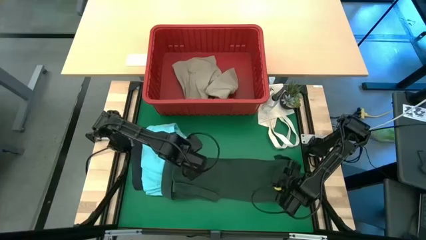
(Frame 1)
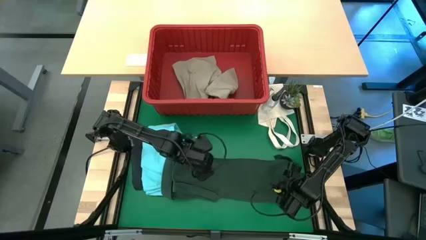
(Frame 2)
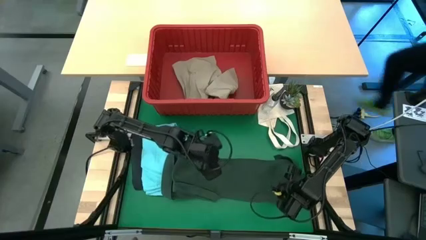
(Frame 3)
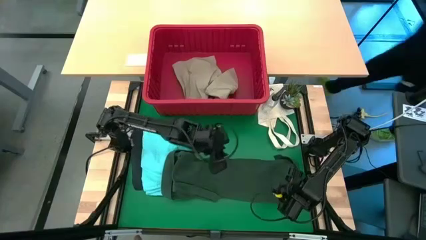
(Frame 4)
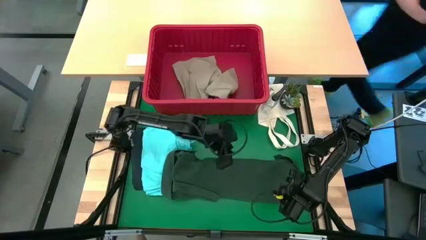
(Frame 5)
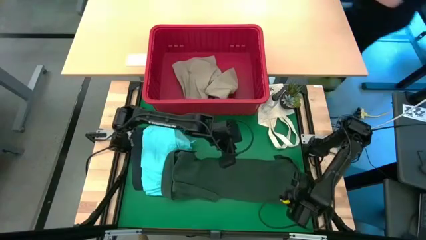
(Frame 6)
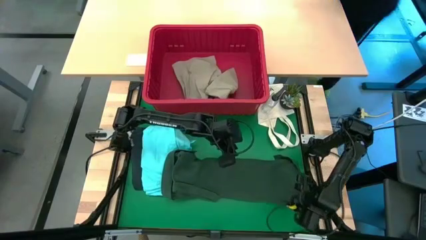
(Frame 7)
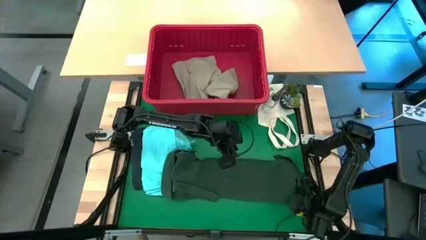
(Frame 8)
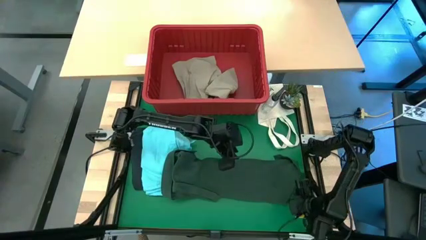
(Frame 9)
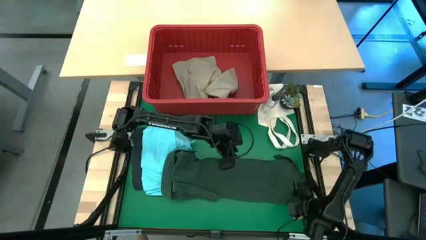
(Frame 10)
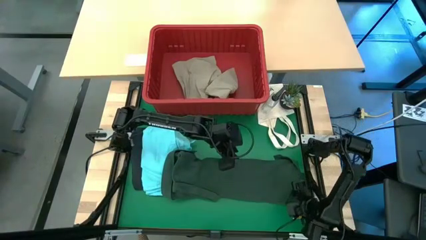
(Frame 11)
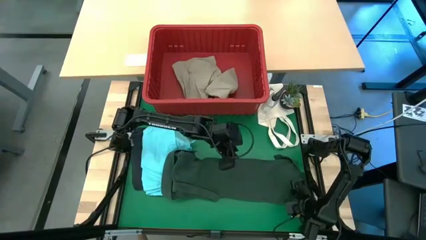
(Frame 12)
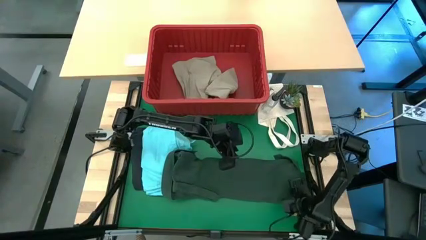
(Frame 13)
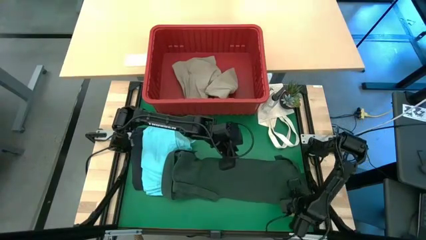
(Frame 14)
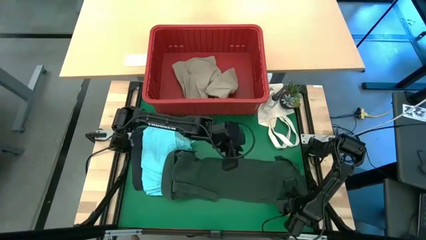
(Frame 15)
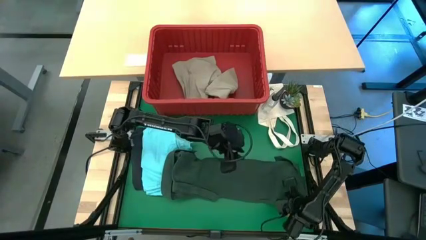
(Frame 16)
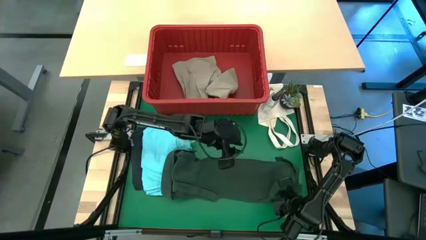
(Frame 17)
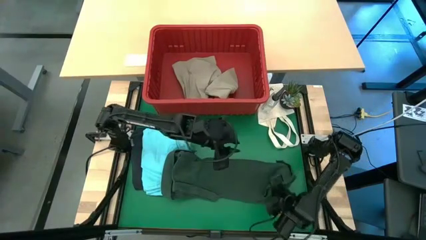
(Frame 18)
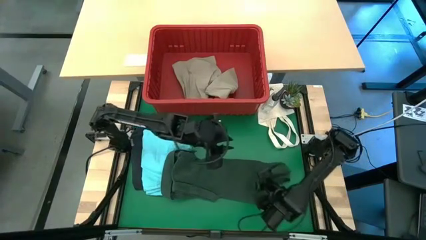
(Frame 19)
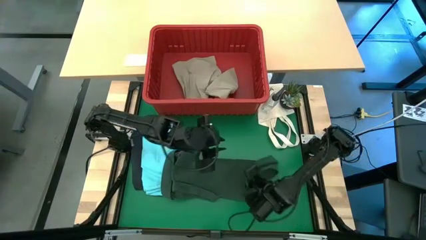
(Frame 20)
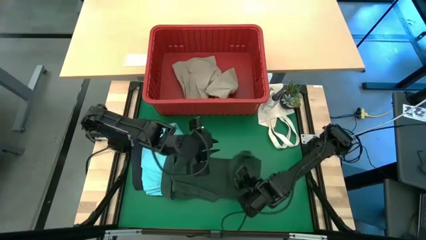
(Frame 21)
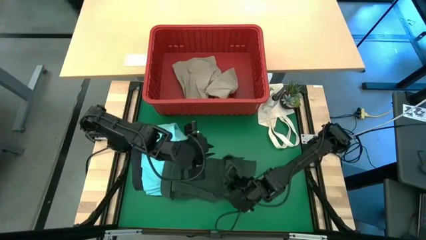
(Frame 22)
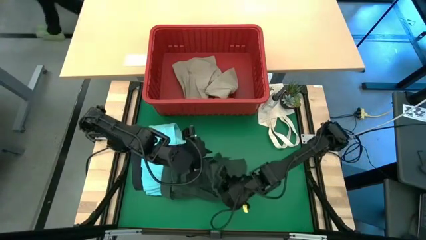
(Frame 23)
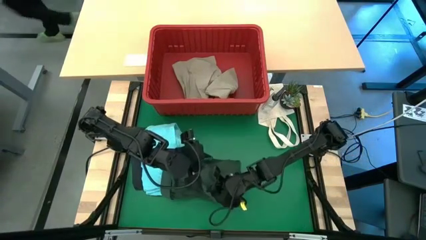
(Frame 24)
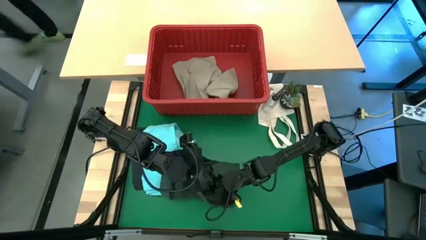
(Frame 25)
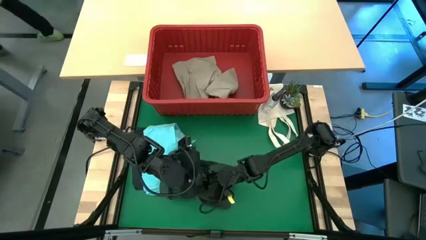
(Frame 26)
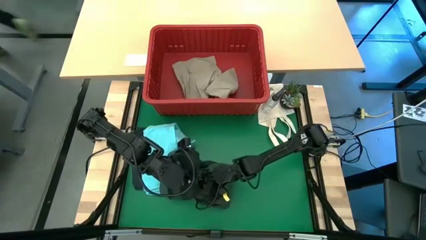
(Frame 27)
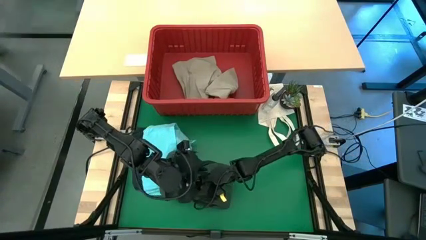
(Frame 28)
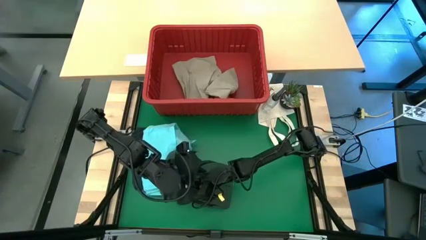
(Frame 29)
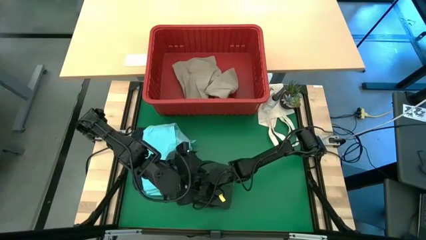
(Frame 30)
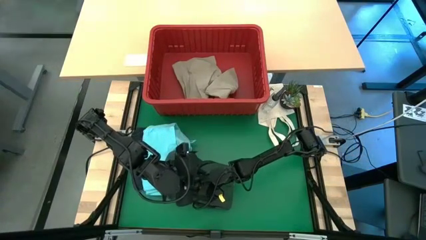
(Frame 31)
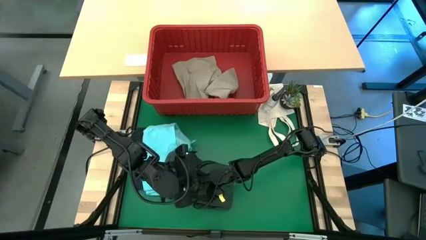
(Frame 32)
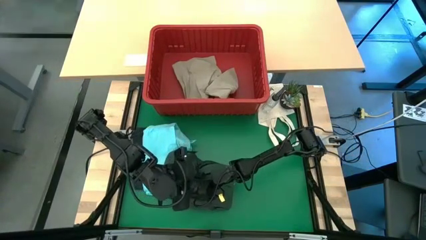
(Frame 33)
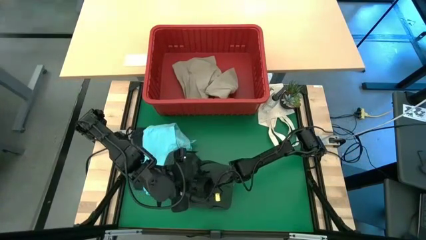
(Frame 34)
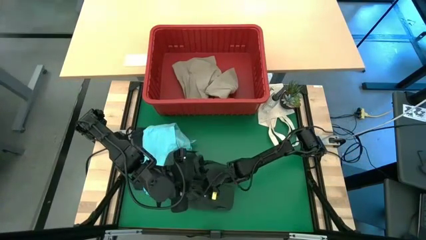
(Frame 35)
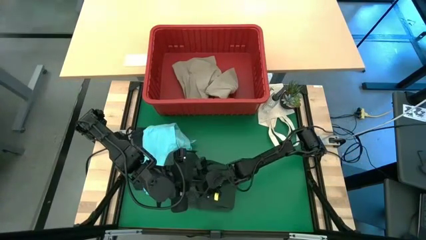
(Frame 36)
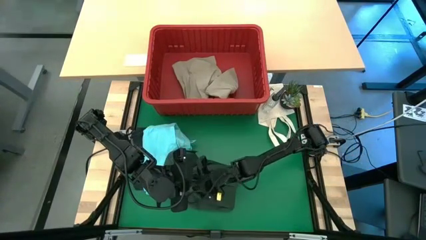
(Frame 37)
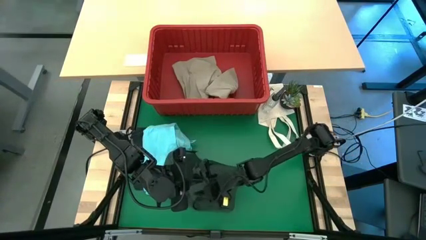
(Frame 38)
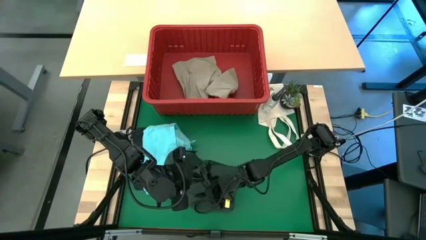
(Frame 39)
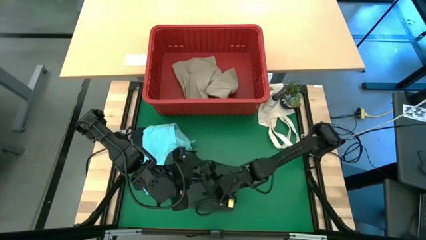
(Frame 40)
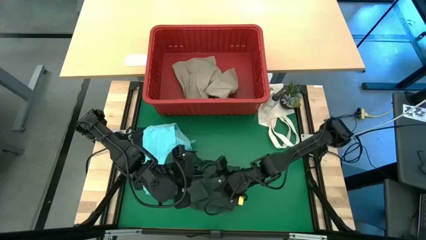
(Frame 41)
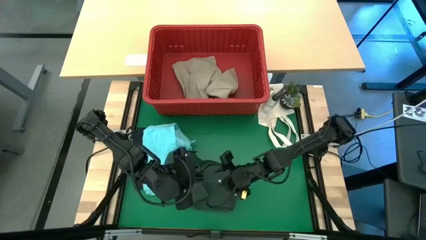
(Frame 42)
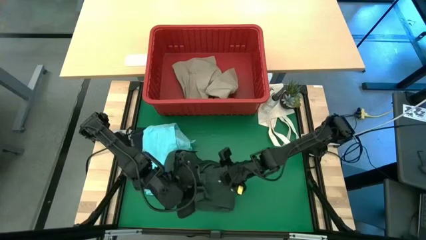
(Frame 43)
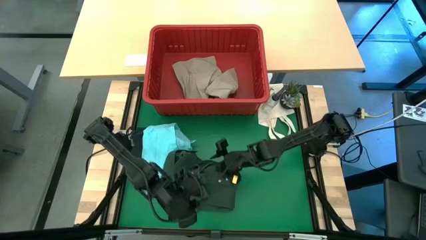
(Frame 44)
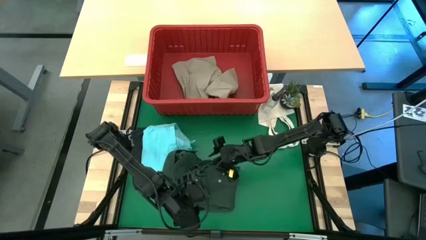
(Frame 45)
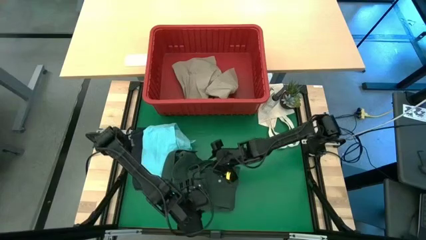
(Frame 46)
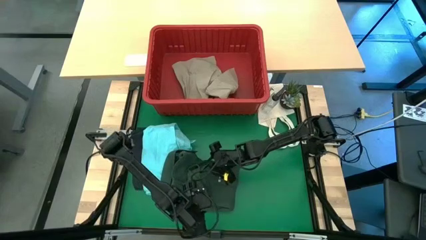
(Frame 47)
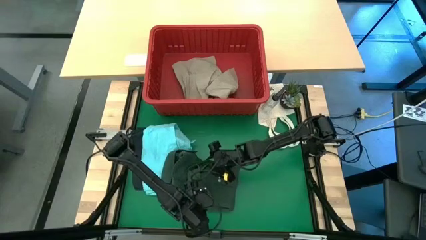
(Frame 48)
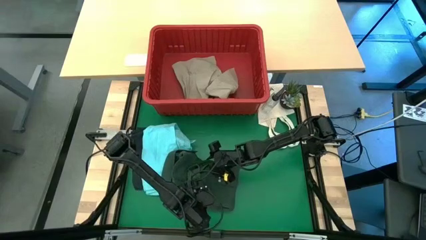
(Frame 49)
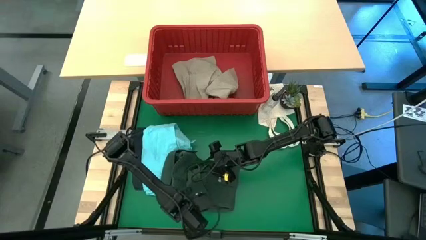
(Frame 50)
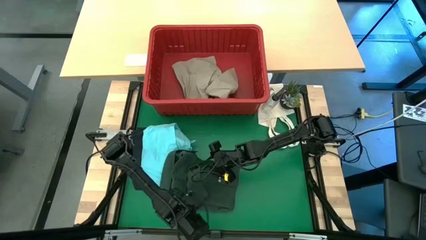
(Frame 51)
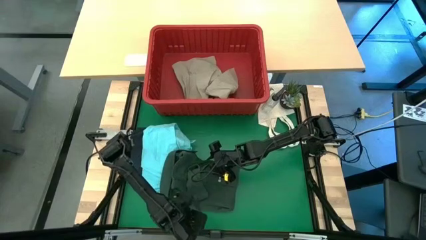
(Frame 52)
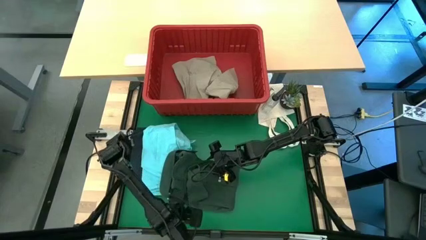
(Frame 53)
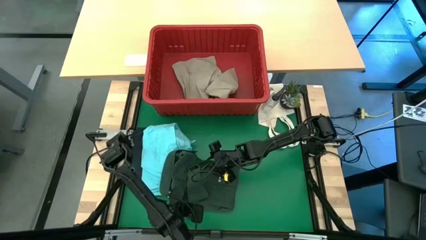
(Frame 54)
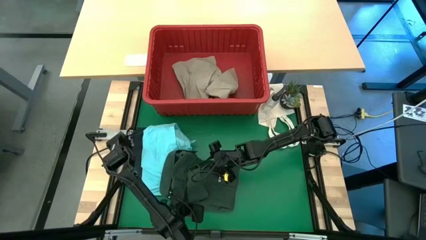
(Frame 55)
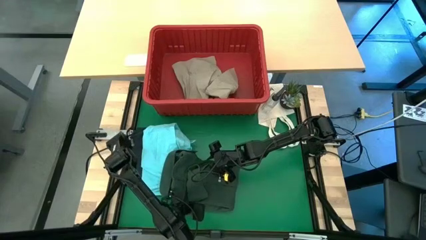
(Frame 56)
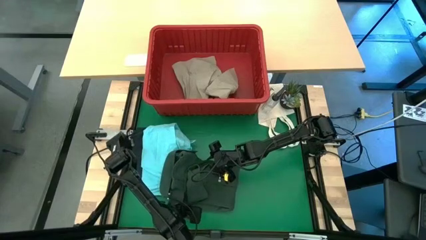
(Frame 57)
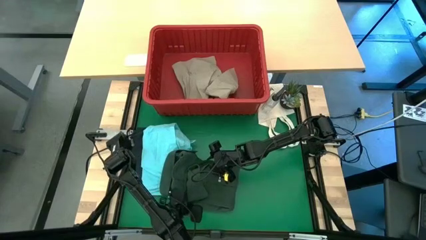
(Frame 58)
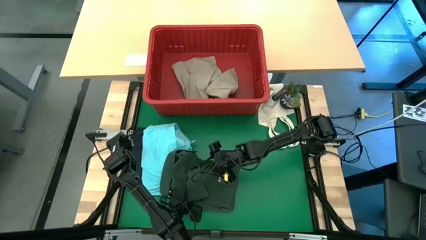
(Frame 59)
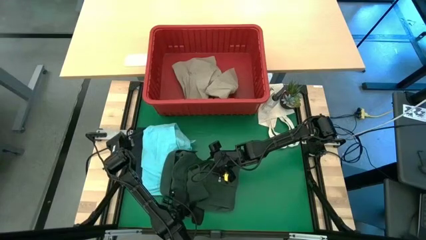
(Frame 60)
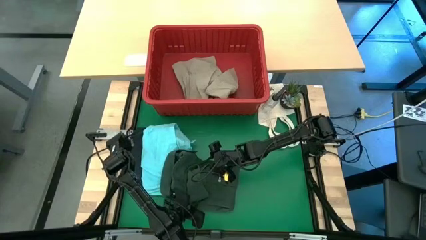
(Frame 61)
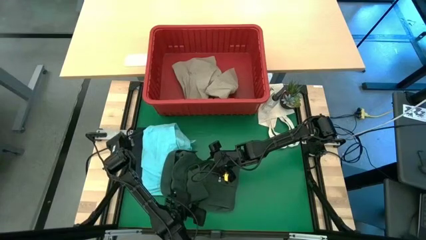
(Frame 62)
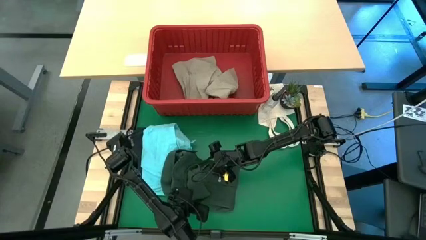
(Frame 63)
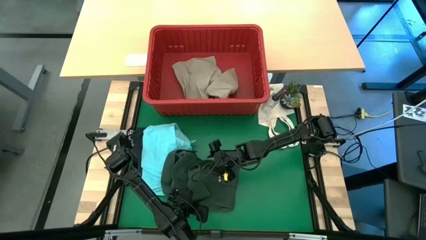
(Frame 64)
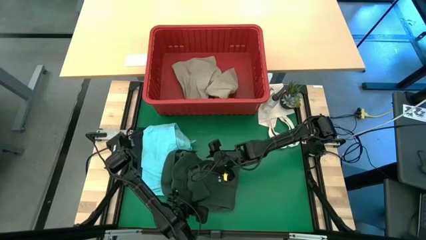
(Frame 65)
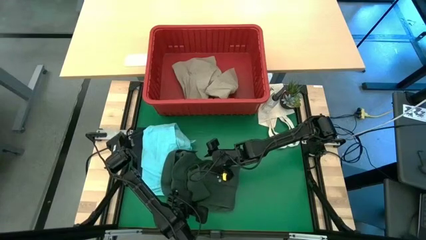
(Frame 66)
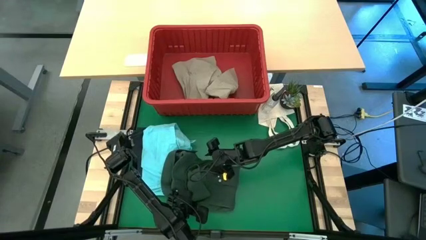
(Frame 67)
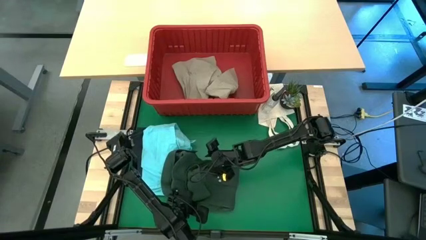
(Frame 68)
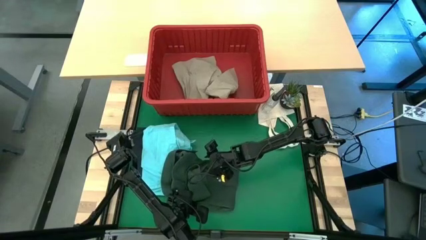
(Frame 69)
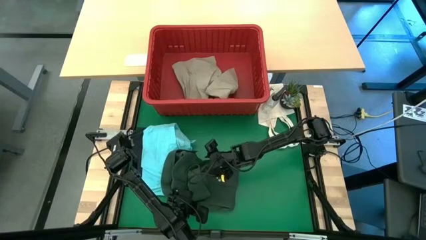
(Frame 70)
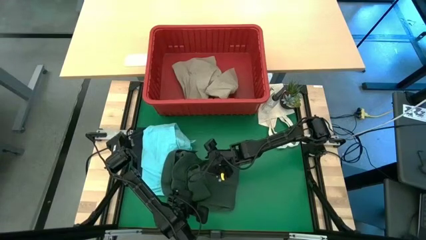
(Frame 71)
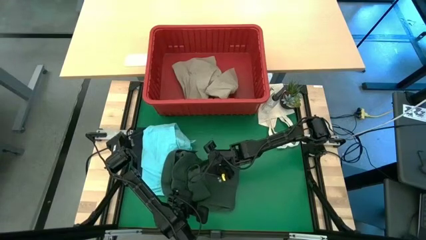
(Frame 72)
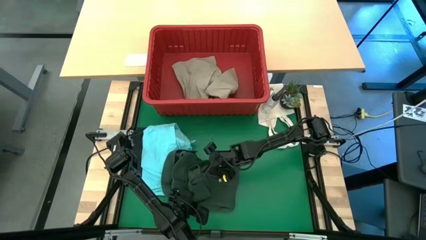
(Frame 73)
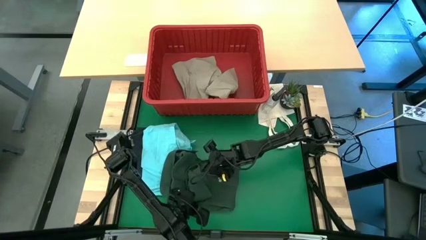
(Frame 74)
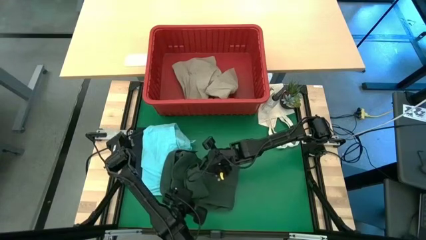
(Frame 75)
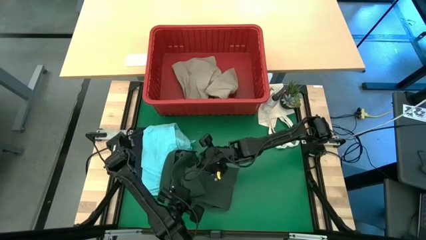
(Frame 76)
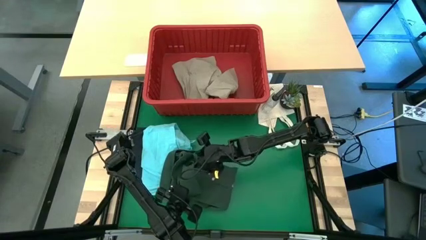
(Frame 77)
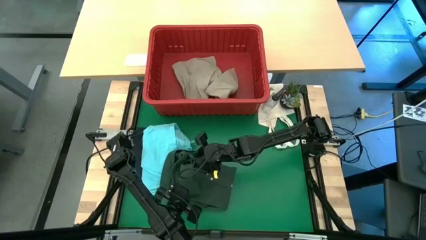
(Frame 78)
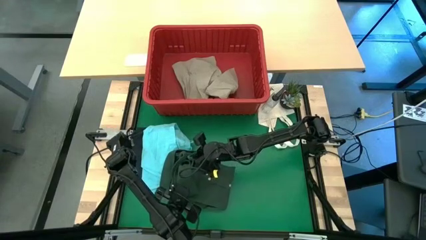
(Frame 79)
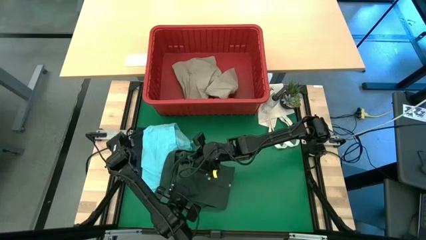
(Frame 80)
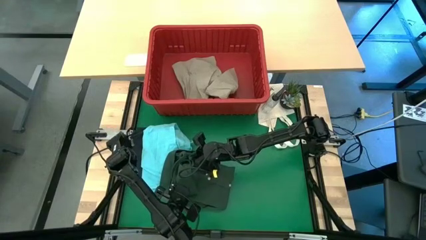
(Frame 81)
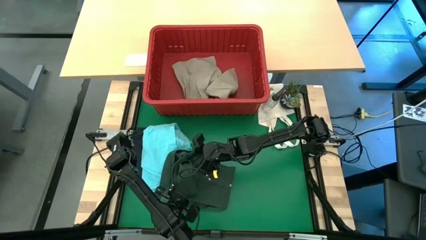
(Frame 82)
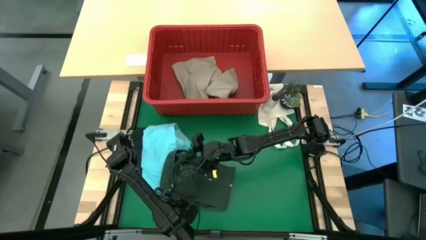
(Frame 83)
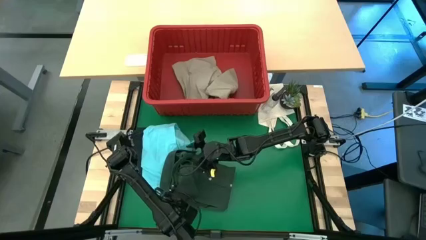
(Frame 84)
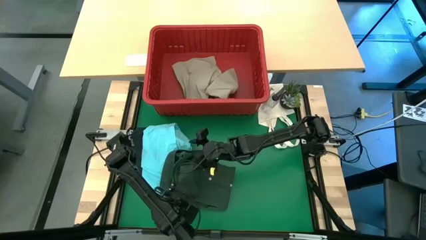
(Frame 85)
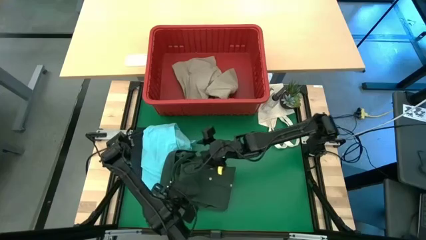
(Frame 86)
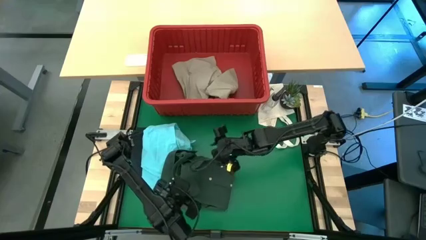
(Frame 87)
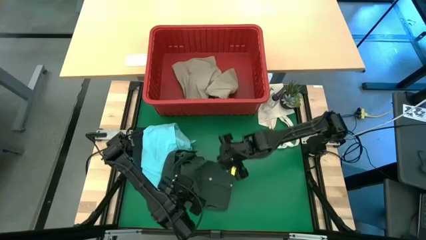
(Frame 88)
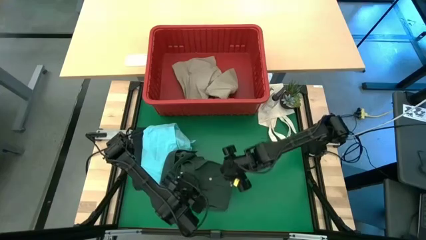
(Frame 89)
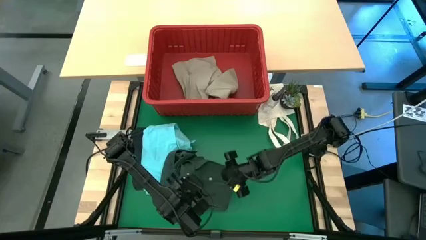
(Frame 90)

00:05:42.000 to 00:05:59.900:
Task: Fold Laundry from Bin
Fold the green polo shirt from the red laundry bin
